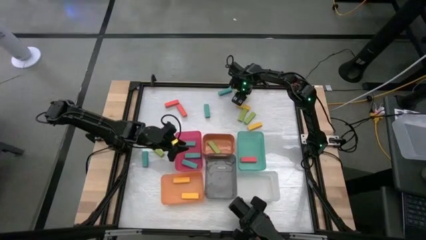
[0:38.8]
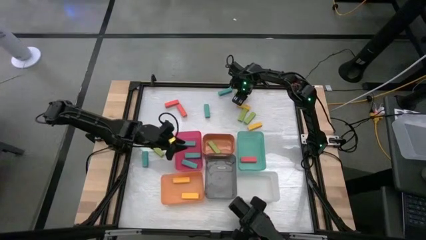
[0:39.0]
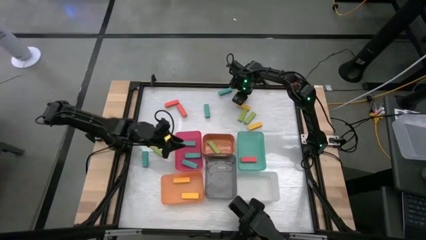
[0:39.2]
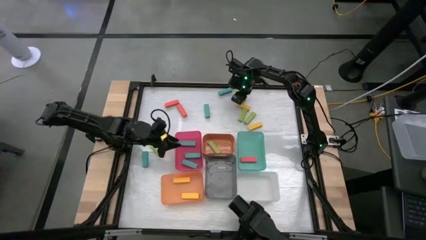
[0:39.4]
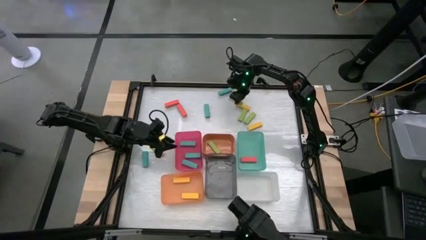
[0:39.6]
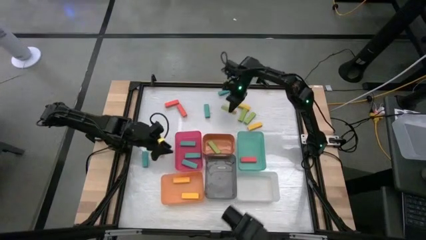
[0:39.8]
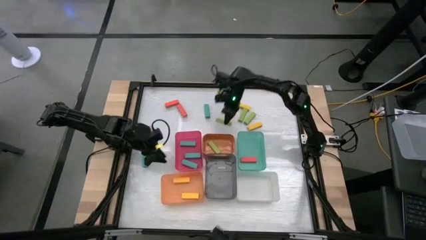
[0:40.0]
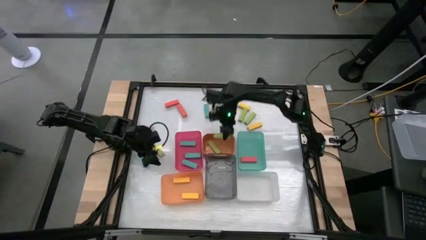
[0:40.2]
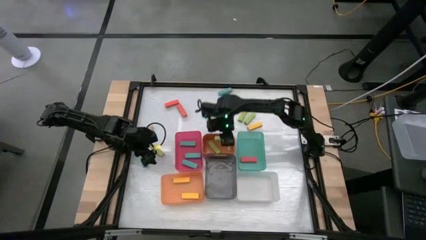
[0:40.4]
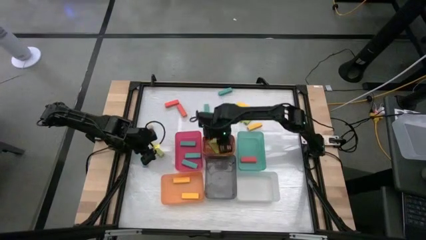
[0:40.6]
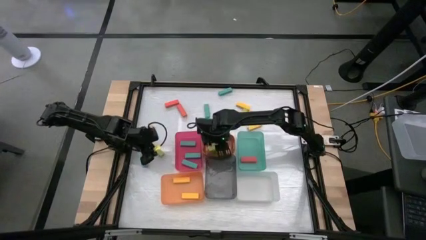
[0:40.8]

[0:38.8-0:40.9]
Task: Sort blocks
Put the green block into the top orange bin

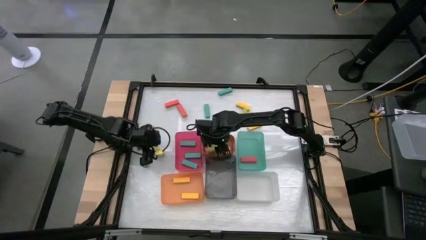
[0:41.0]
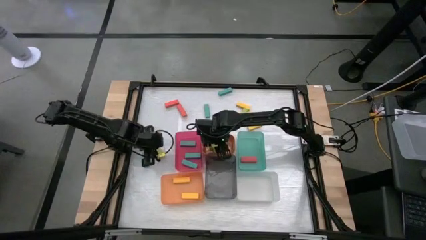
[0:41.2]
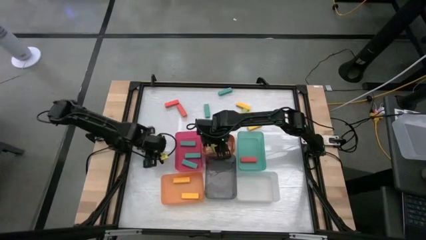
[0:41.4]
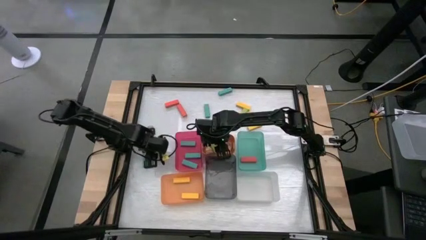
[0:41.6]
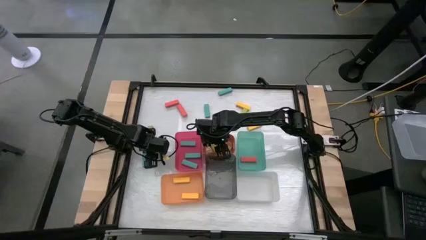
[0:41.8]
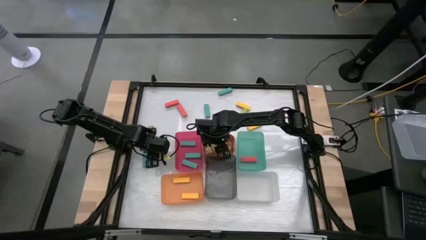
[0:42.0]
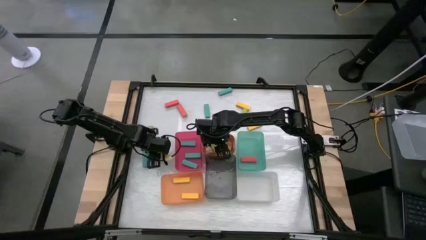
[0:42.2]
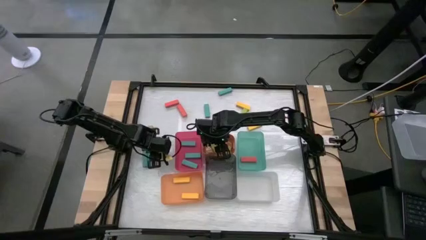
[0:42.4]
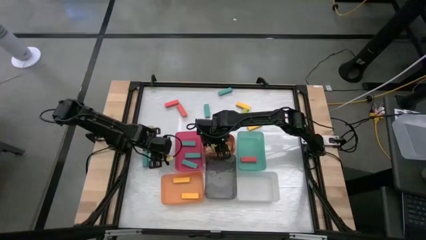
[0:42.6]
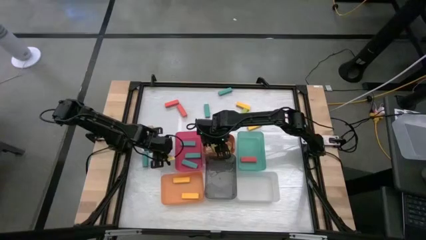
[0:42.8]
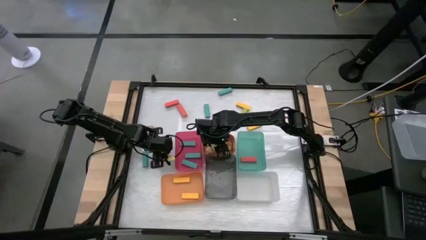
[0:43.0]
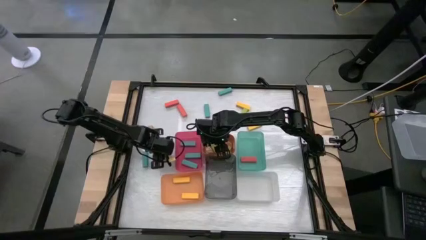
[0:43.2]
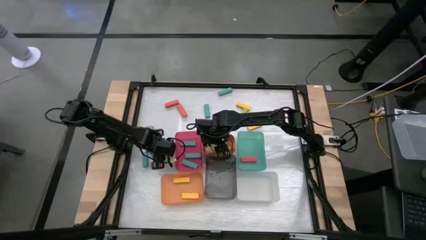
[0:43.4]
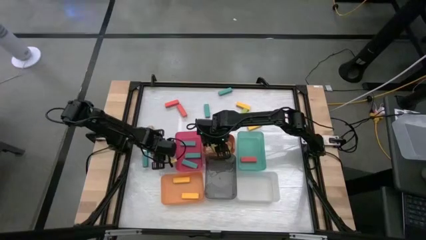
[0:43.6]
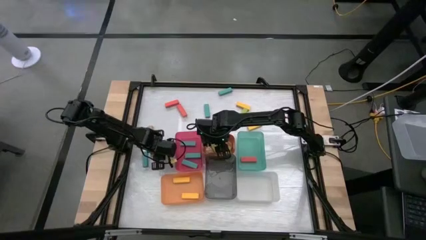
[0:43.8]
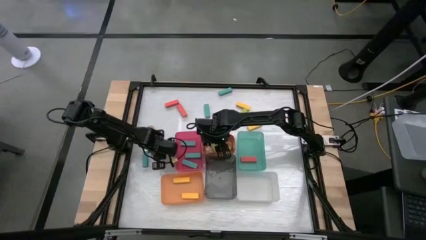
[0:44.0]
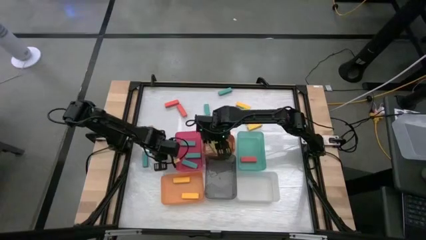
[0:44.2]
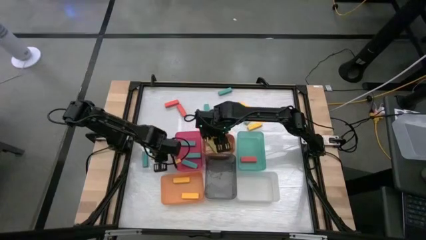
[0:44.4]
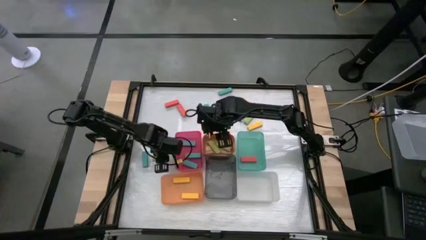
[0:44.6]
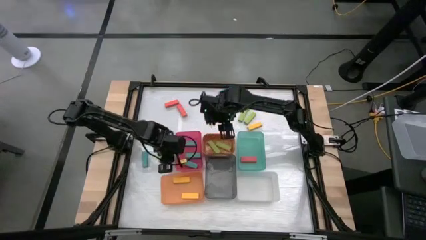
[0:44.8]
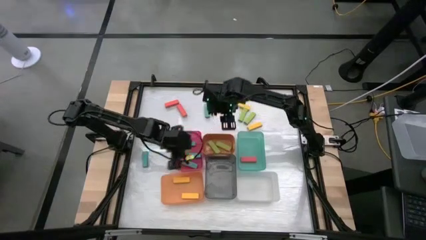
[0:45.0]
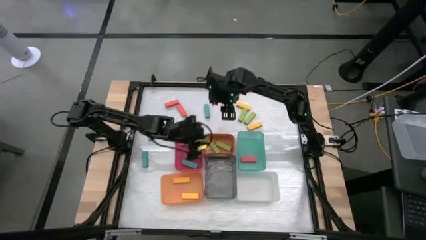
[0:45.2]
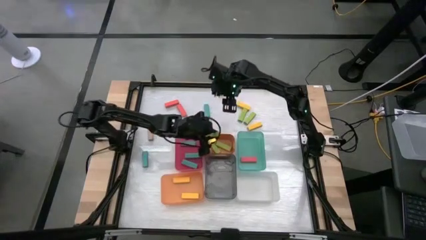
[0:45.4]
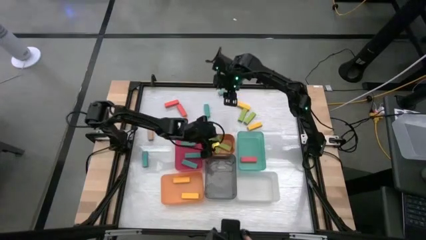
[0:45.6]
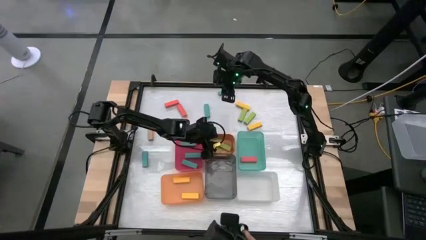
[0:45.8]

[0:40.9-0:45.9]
Put the bottom green block into the top orange bin

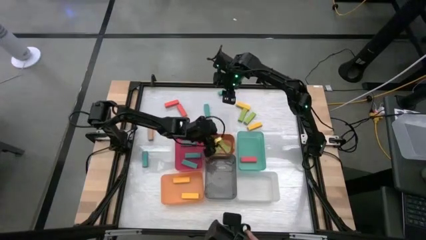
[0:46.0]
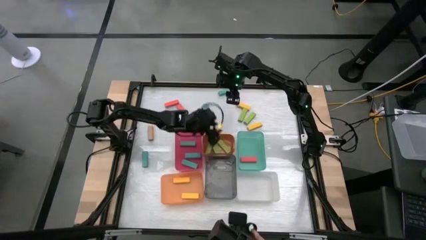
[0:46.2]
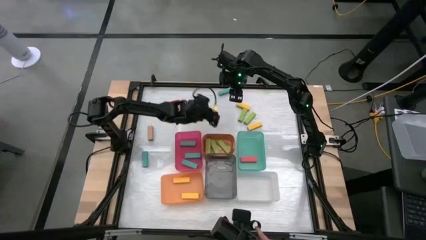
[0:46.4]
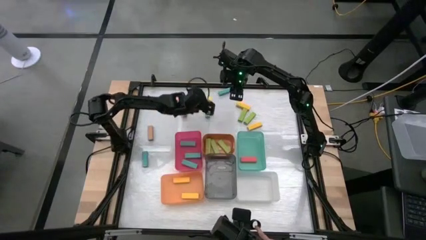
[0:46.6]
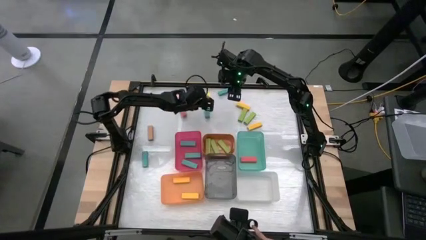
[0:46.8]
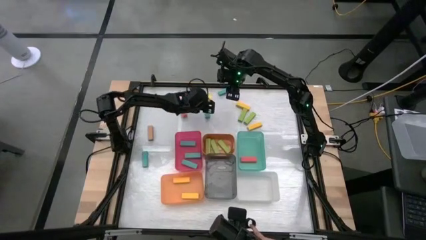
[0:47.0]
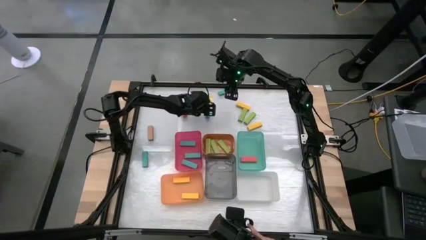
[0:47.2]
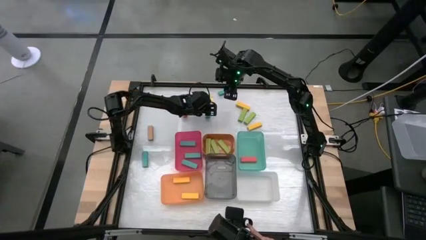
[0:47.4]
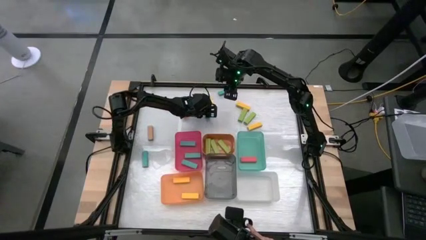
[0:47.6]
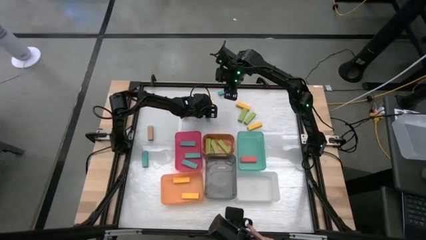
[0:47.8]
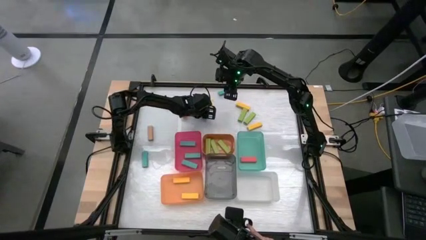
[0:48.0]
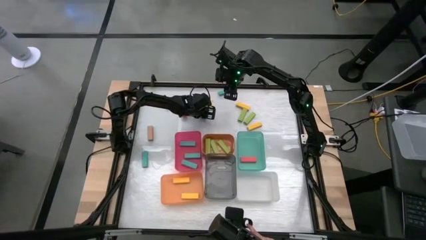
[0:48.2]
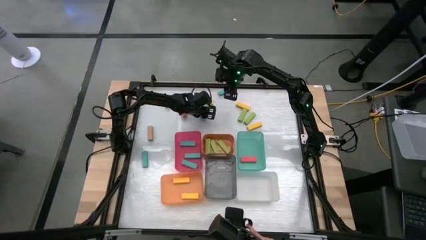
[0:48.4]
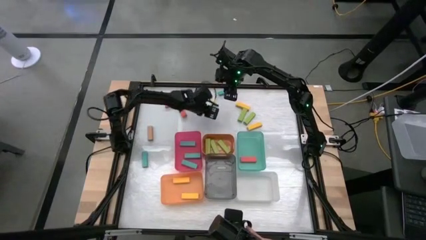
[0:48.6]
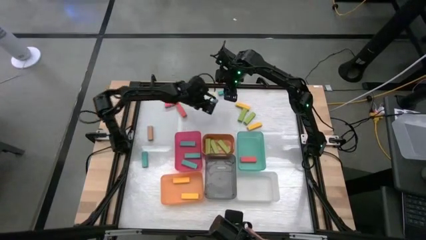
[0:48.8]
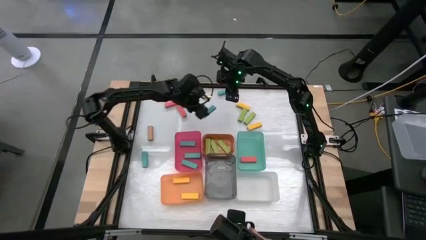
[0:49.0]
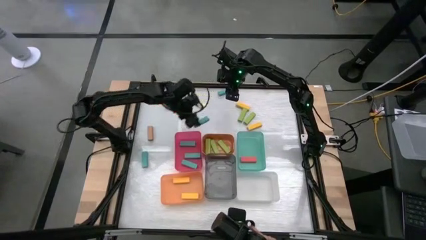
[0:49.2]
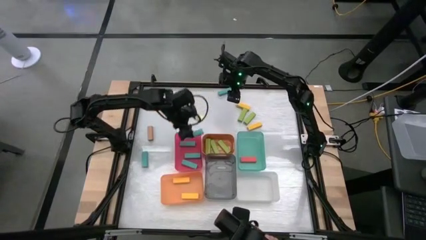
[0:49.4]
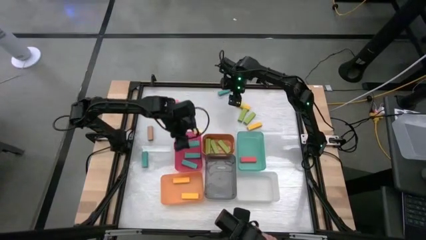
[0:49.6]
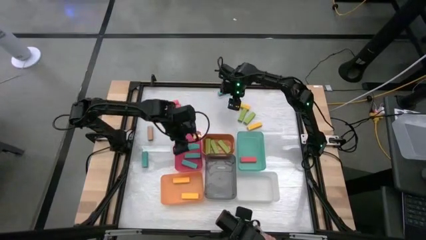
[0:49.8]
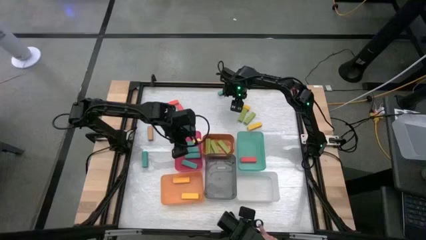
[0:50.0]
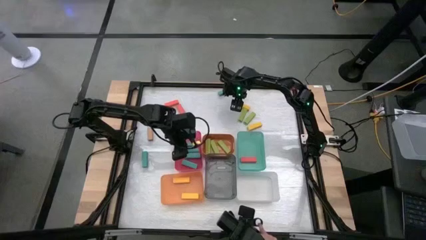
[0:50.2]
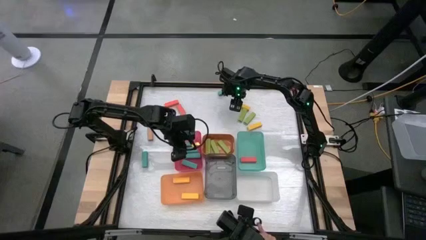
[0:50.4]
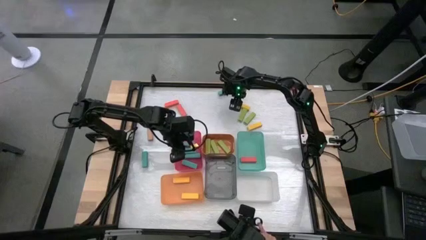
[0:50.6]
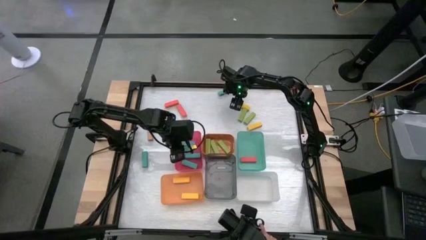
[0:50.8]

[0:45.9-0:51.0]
Put the middle blue block into the pink bin

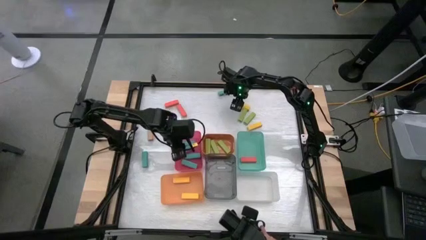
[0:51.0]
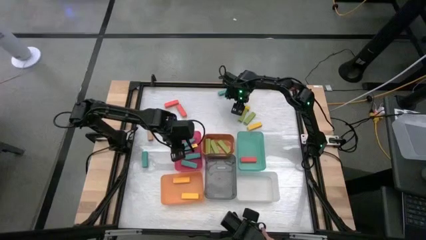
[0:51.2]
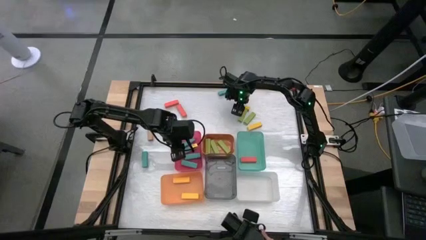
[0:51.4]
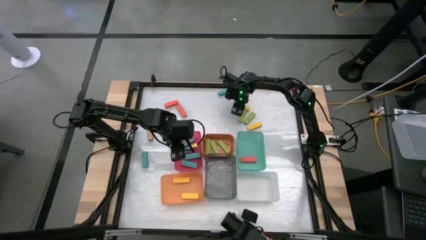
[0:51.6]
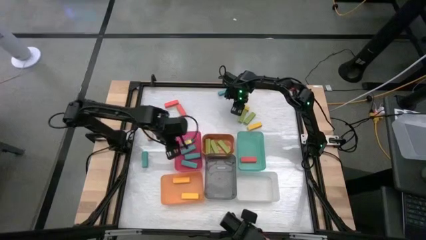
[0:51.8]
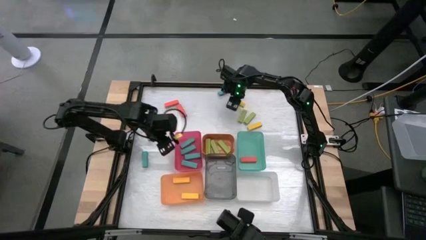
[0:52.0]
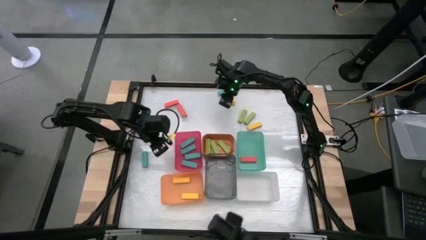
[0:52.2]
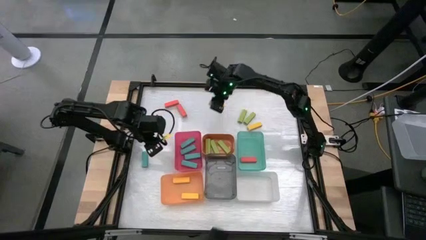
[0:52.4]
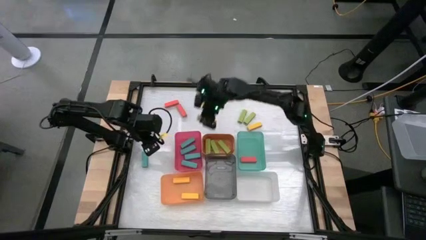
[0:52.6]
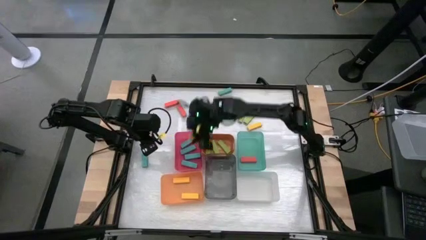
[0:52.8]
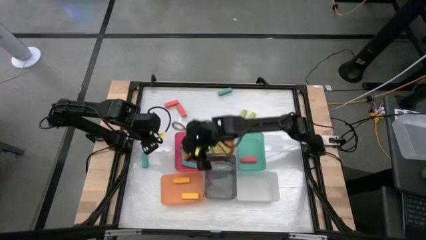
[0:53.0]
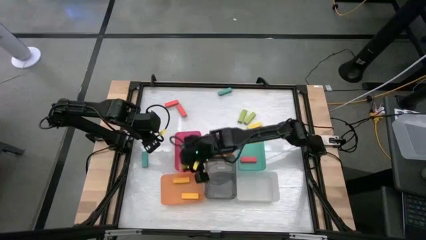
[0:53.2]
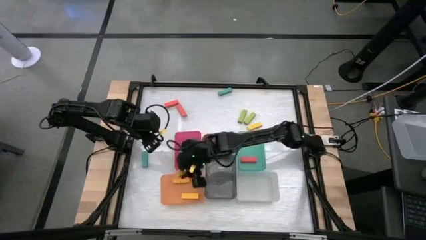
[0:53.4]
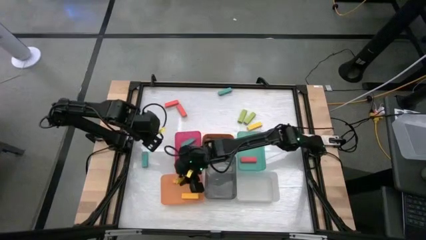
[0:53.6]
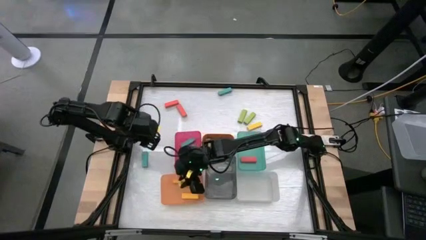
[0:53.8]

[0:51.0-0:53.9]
Put the top right yellow block into the bottom orange bin

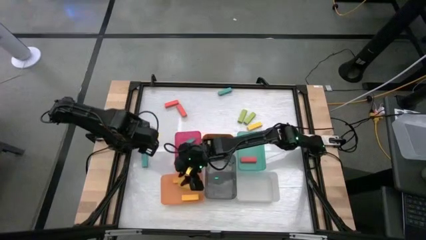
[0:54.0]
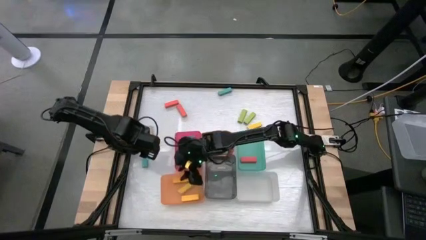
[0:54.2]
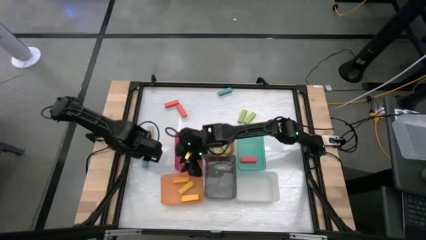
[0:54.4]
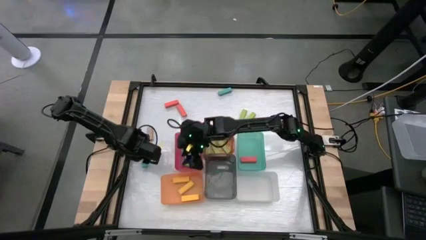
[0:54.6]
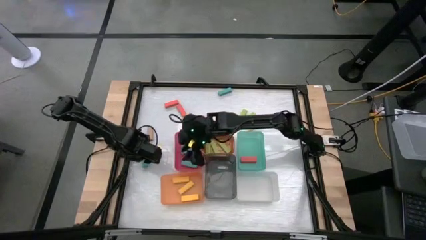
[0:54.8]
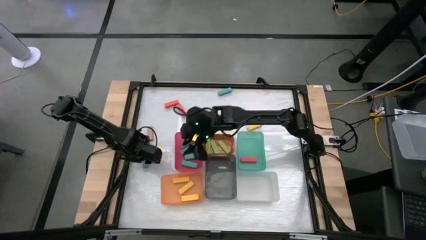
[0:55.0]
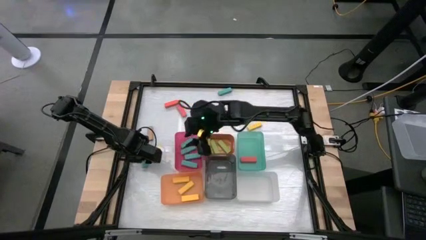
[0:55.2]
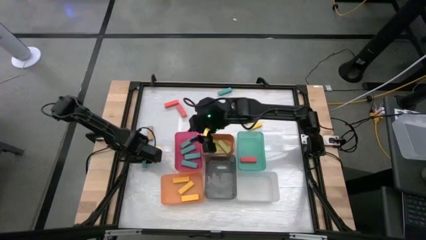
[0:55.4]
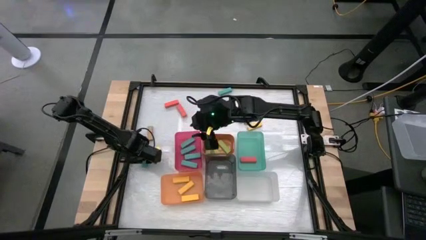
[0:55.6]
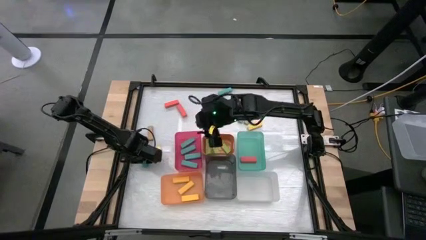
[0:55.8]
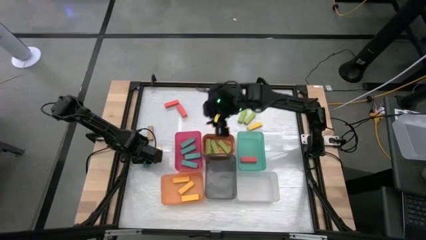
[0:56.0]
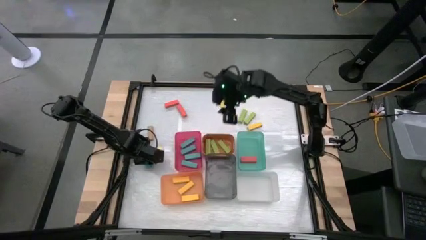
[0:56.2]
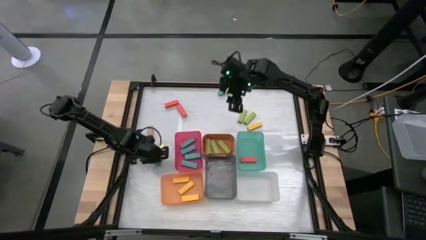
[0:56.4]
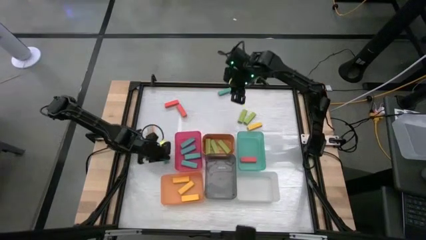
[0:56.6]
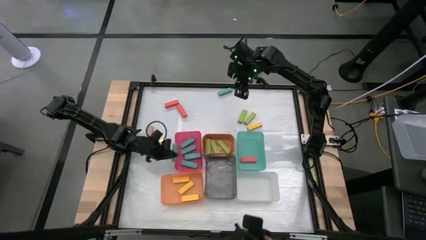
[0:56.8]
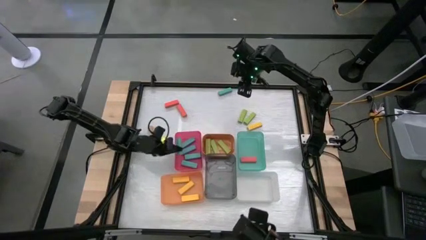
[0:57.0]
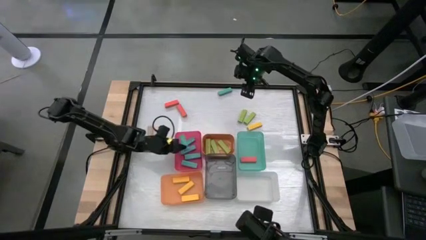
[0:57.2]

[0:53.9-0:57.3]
Put the bottom blue block into the pink bin
